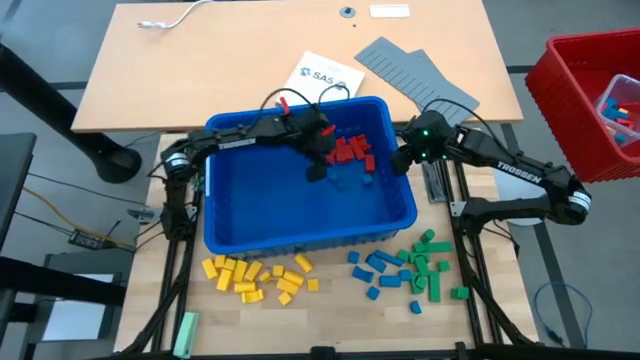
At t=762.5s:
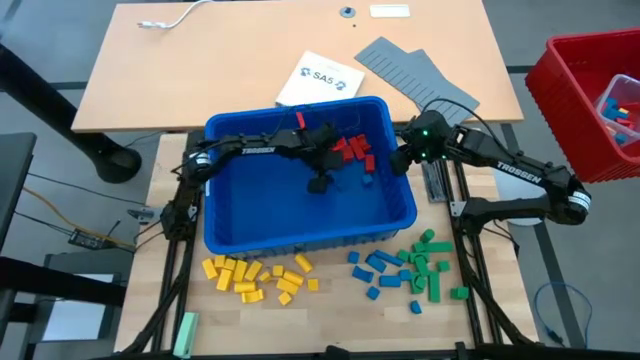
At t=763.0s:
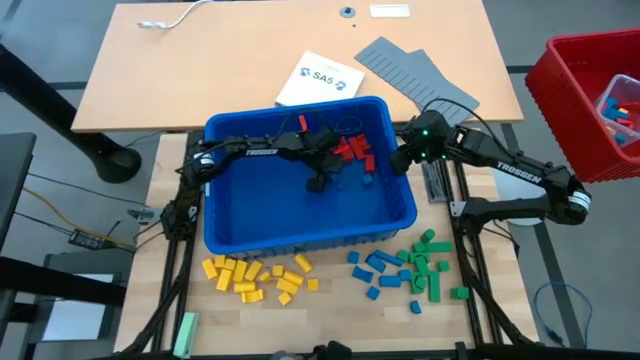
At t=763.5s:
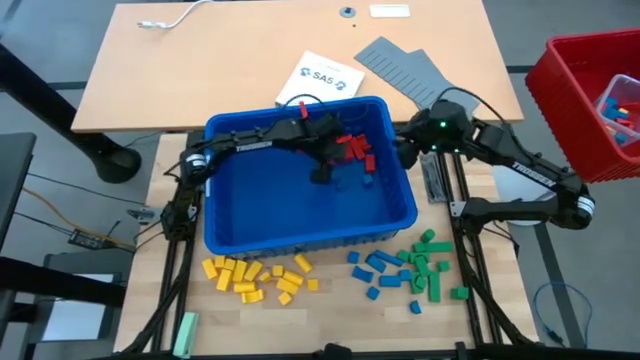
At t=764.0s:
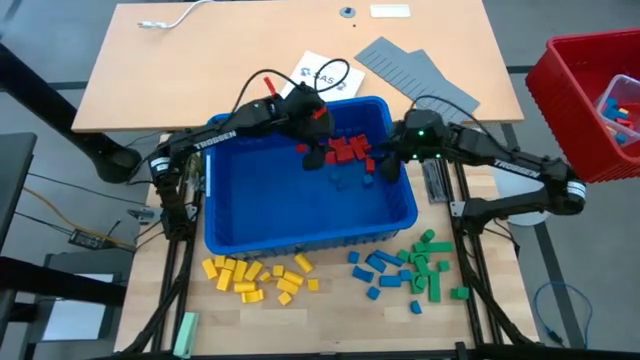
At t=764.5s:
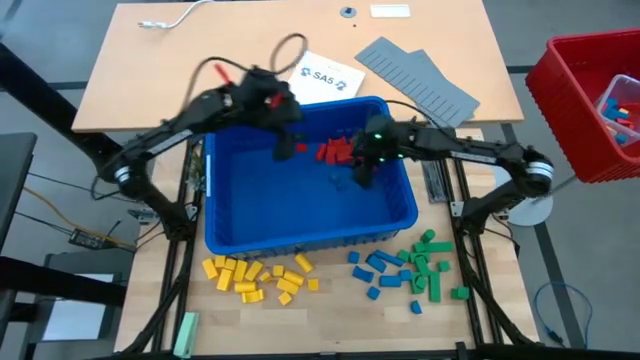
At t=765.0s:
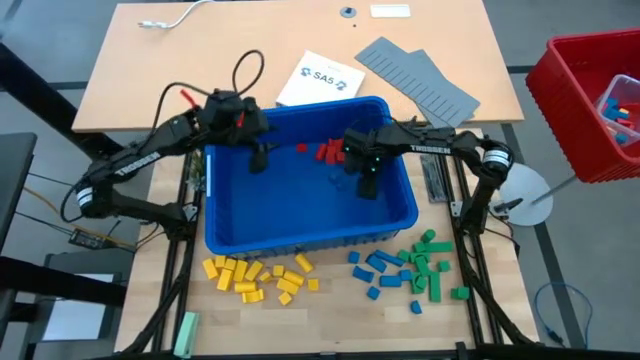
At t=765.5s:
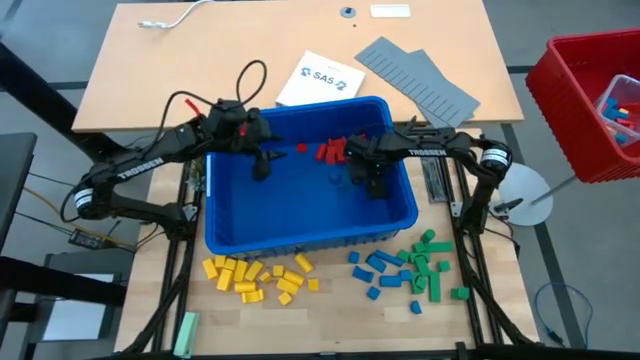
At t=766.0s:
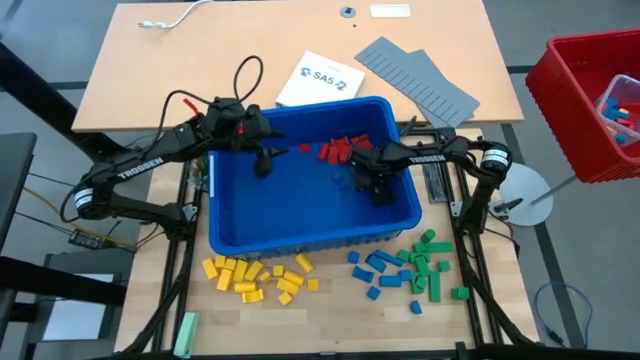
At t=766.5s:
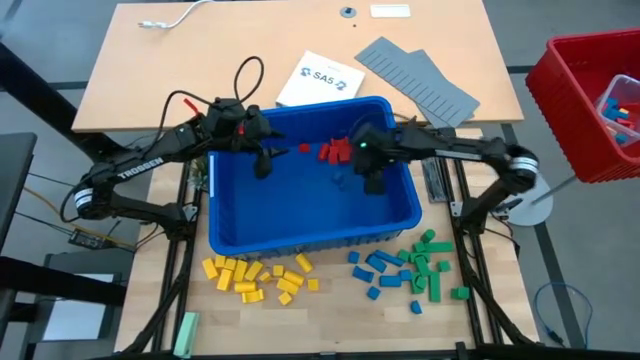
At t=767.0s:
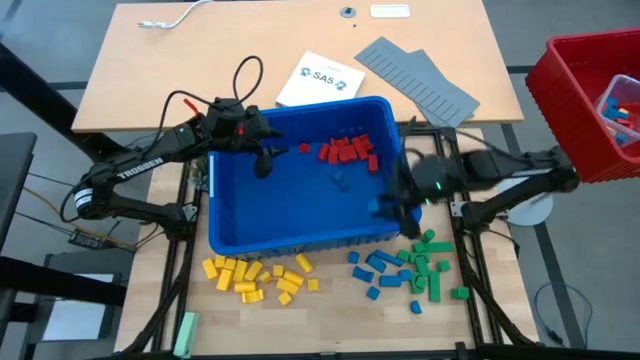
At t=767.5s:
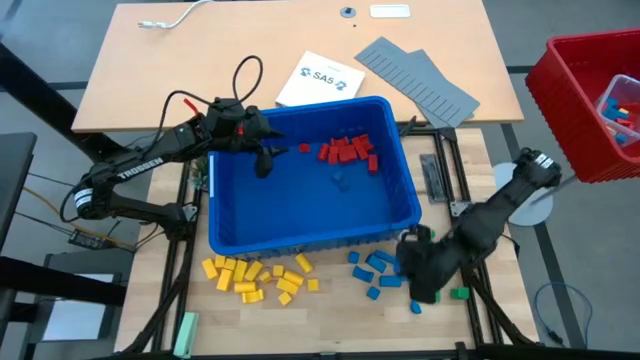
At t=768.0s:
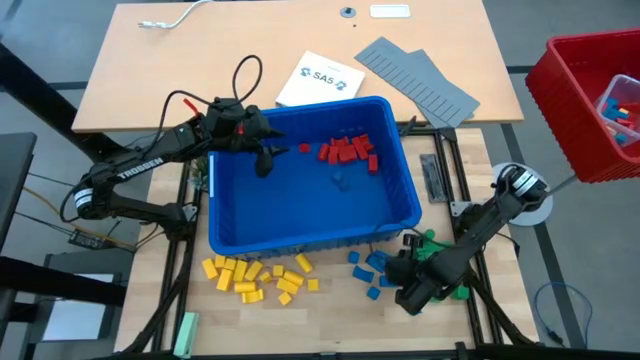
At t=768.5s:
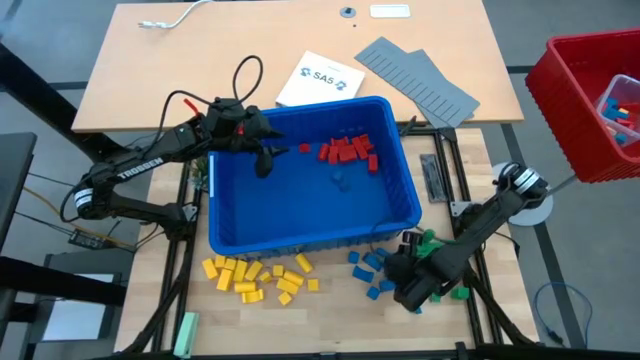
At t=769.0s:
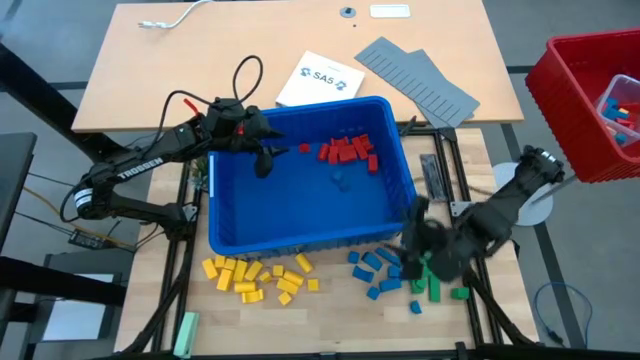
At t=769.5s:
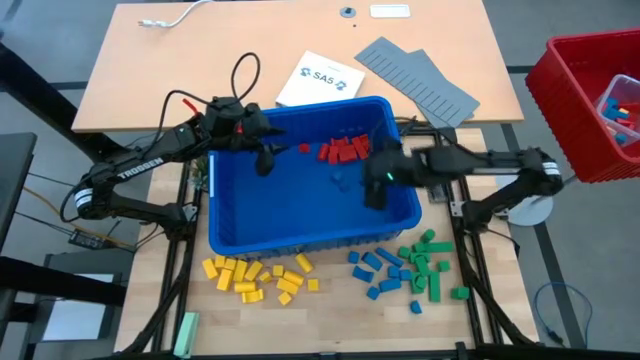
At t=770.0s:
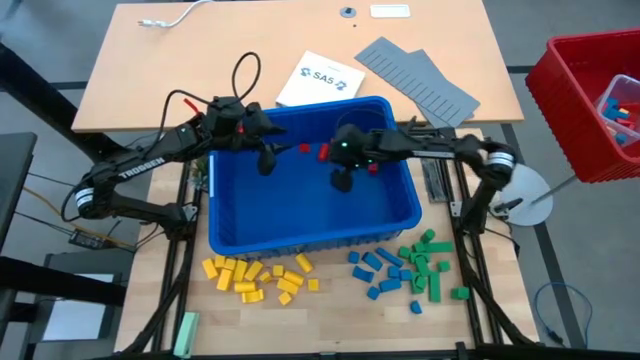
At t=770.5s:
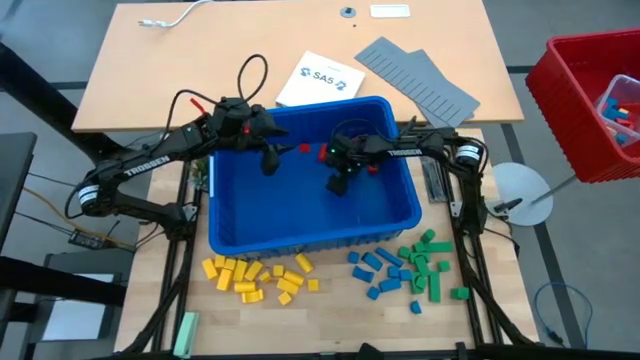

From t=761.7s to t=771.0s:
Task: Sort blocks
Remove the blue block from the blue bin

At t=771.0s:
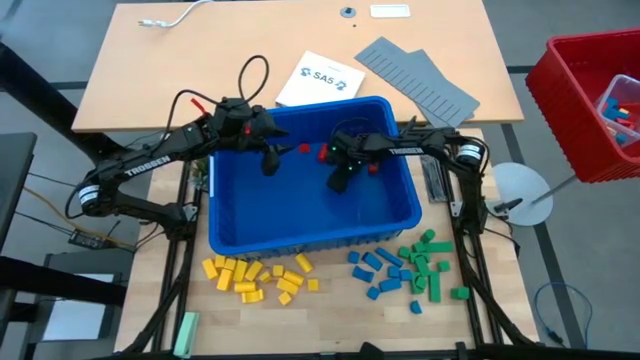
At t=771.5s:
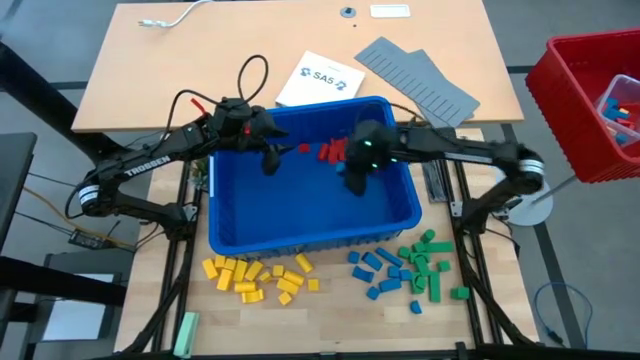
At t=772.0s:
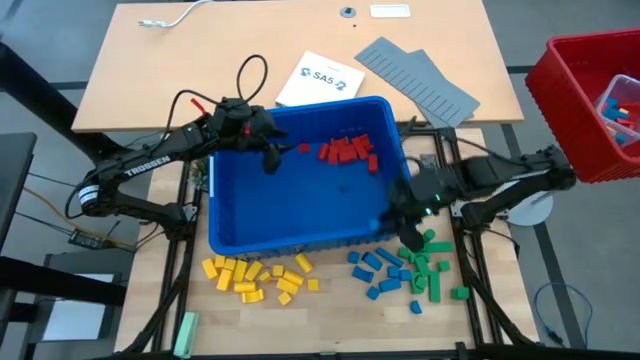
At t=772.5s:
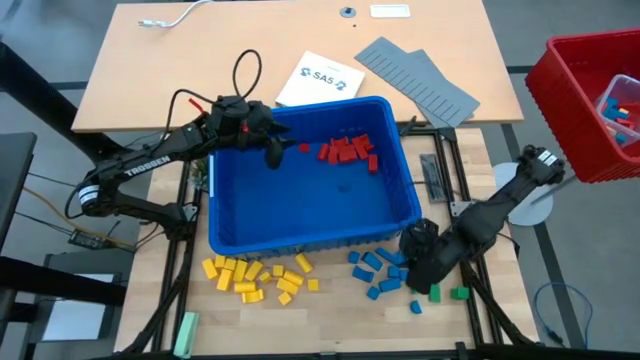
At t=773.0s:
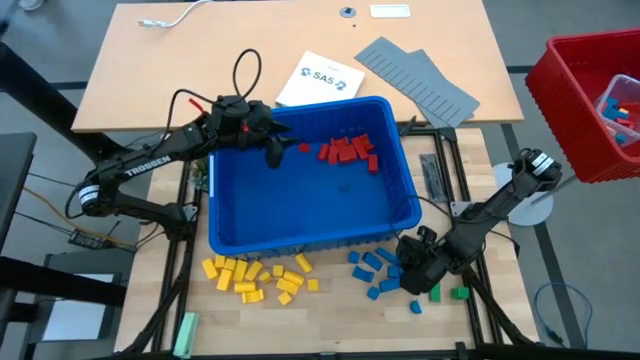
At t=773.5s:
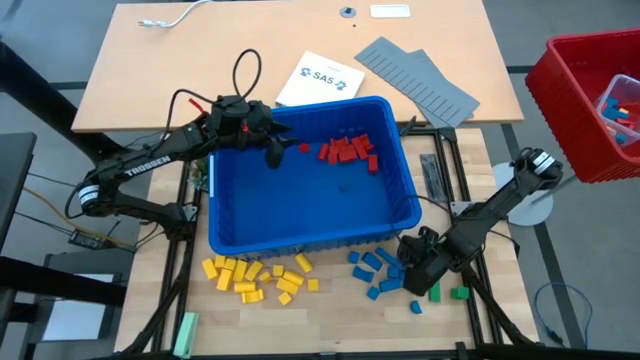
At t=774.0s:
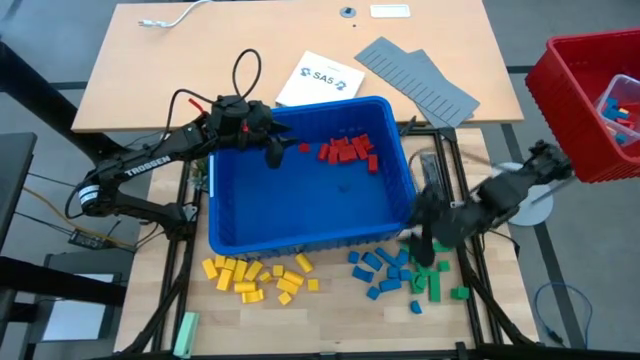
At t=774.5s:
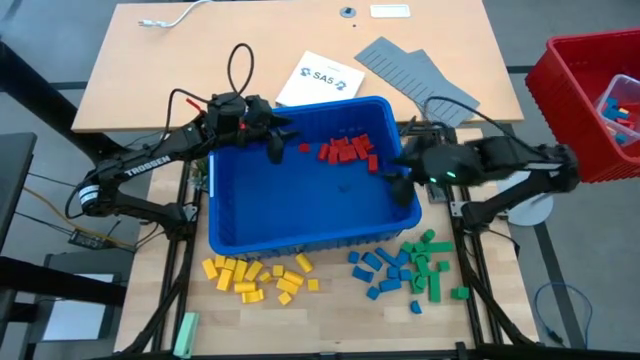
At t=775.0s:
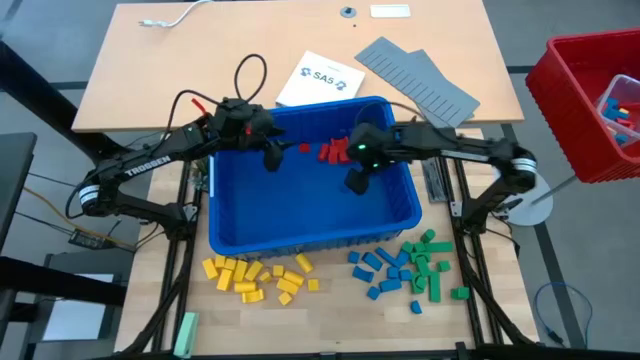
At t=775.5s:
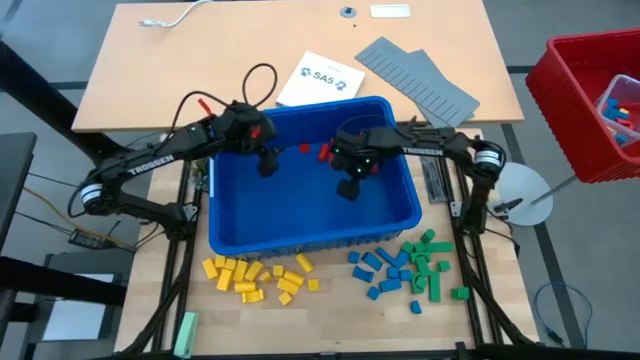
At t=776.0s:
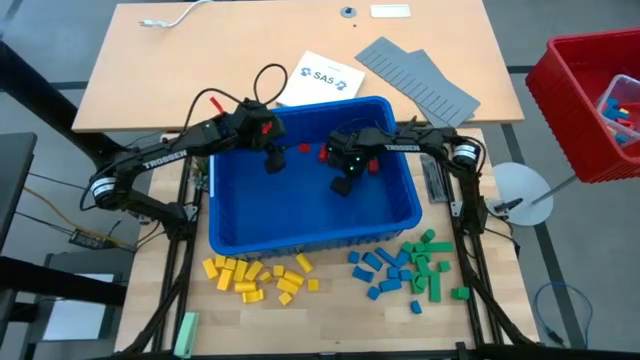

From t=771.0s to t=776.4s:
Remove the blue block from the blue bin

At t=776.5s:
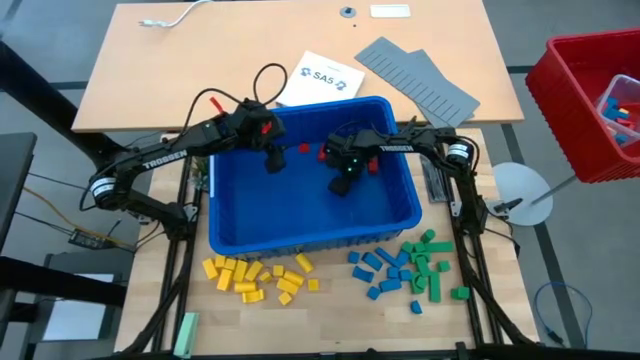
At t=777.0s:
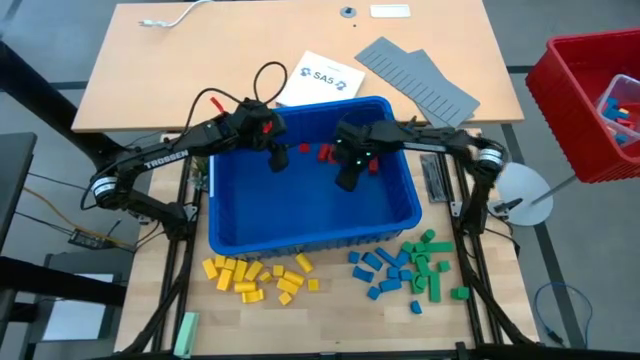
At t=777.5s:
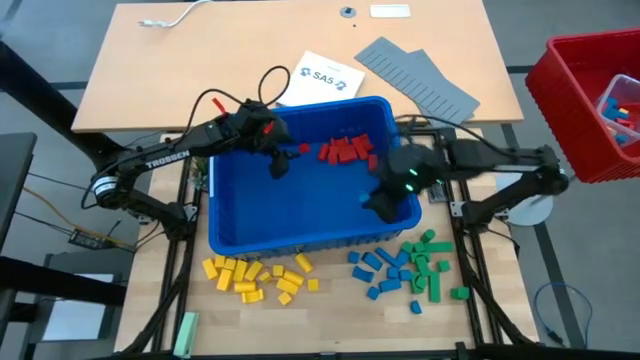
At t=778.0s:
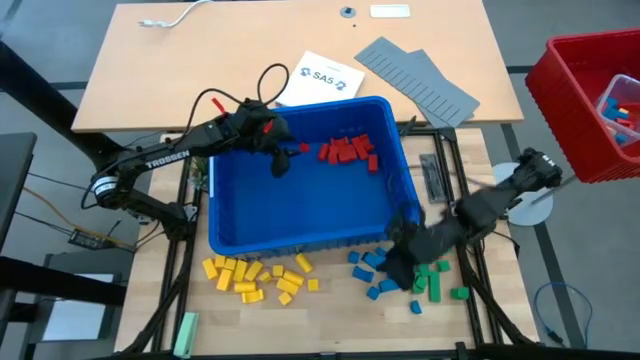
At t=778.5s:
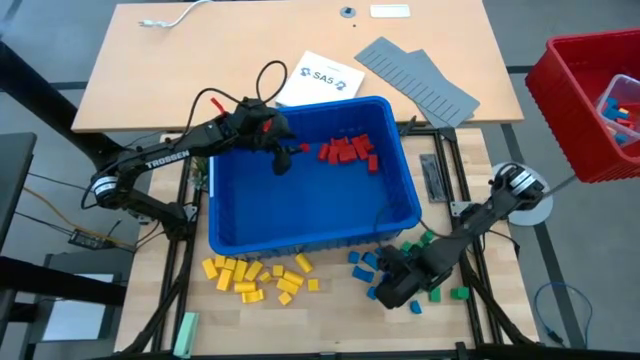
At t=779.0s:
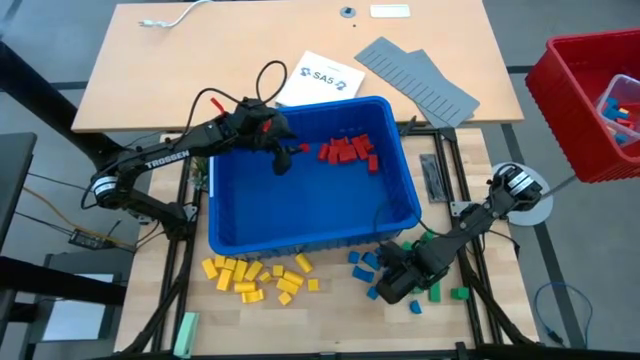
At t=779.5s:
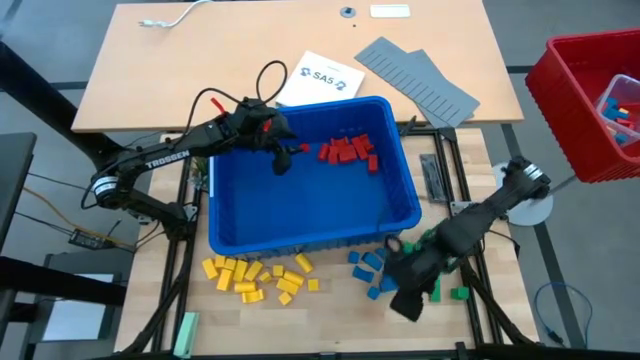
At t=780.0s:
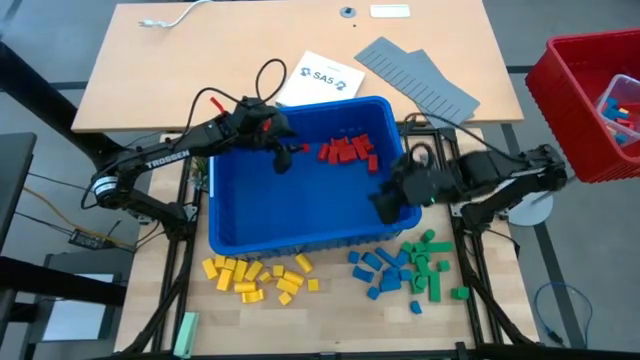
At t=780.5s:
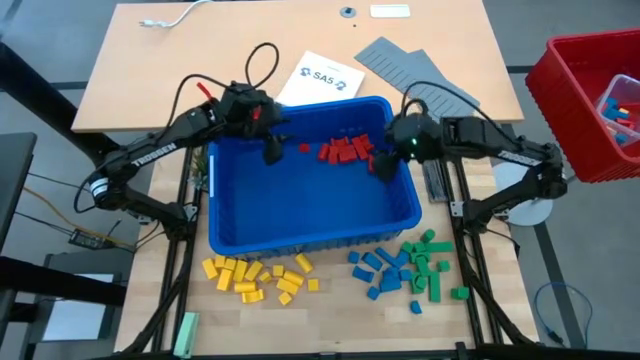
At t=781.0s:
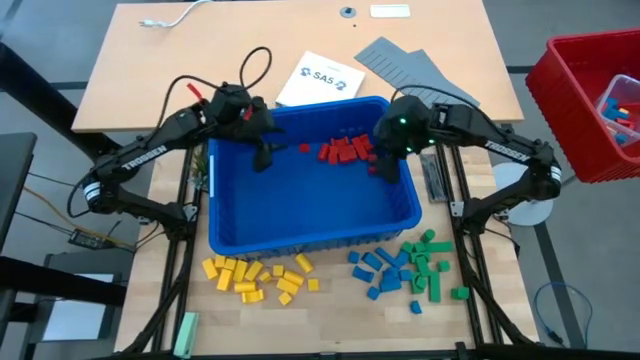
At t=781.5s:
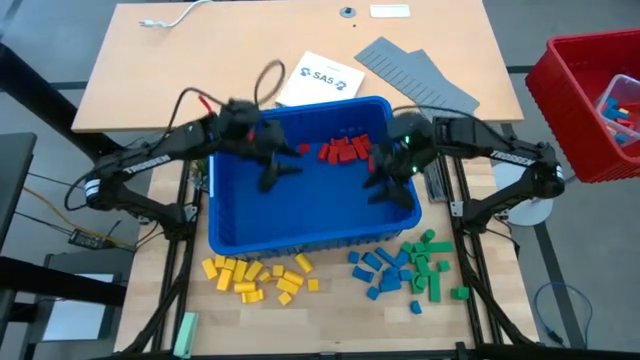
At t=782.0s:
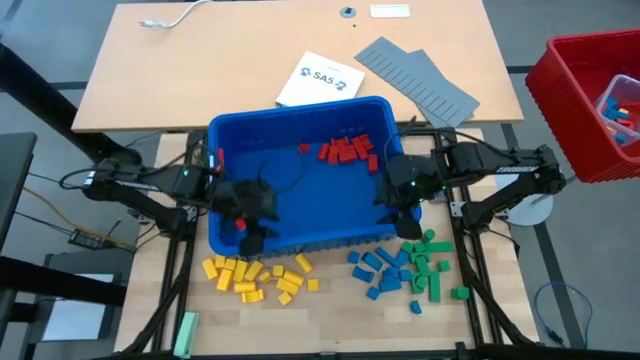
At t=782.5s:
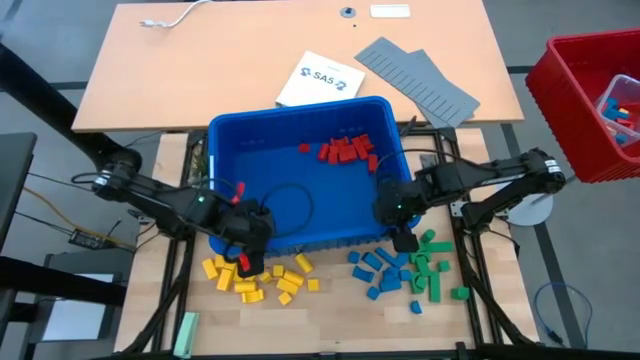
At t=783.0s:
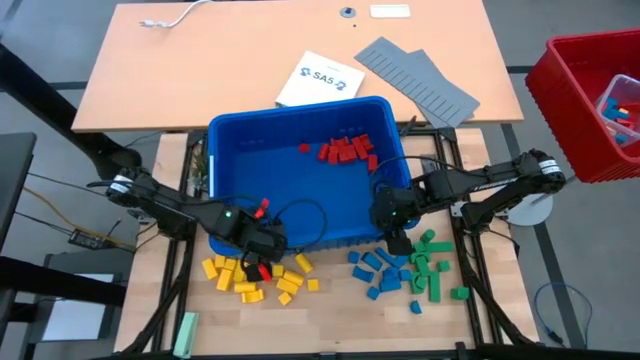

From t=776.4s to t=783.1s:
Remove the blue block from the blue bin
